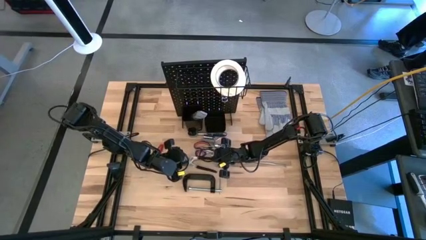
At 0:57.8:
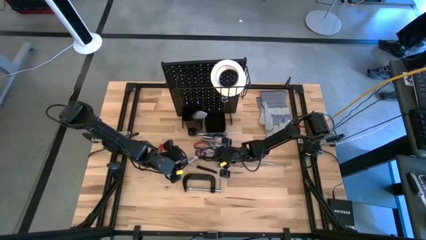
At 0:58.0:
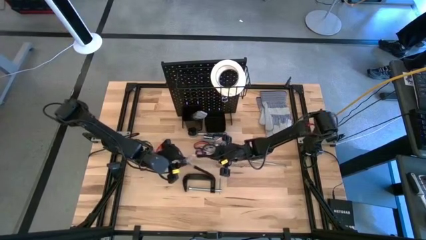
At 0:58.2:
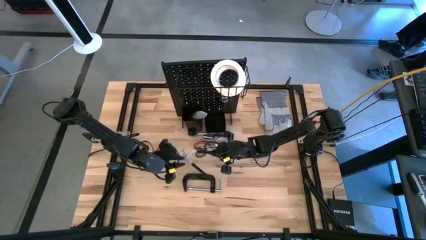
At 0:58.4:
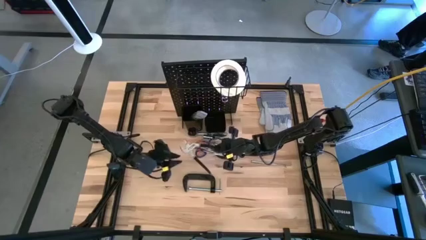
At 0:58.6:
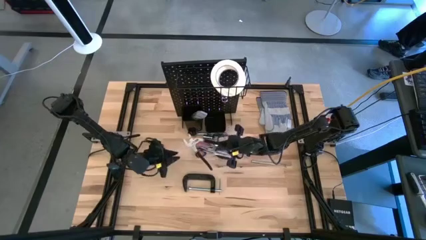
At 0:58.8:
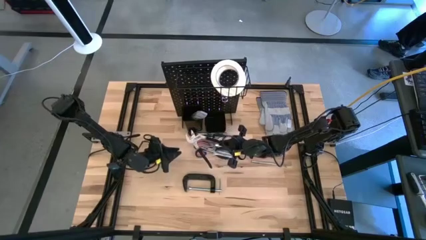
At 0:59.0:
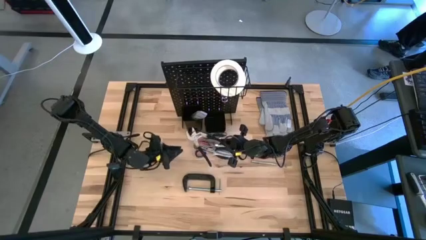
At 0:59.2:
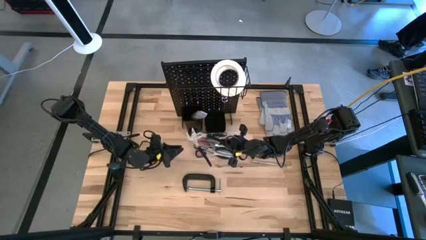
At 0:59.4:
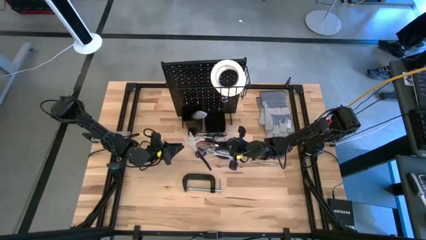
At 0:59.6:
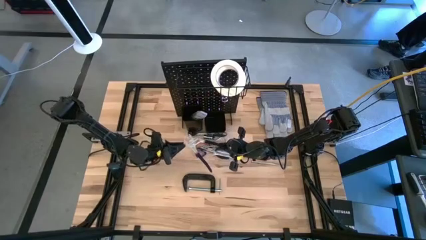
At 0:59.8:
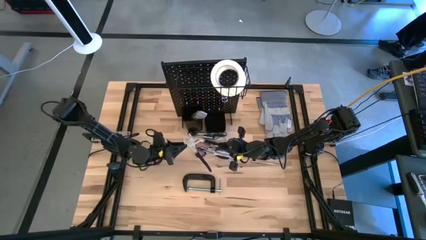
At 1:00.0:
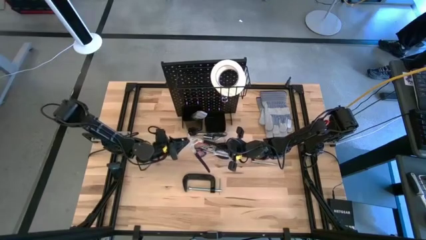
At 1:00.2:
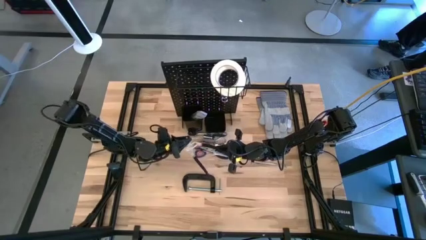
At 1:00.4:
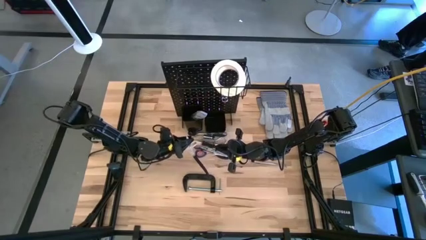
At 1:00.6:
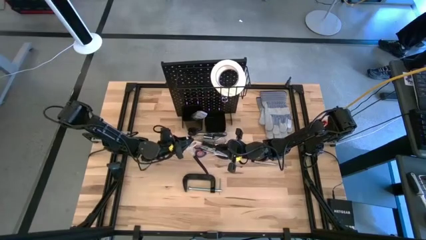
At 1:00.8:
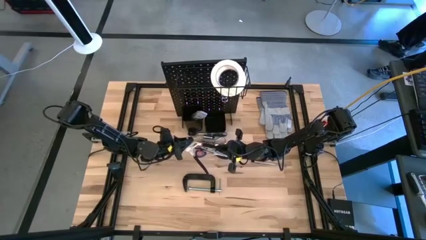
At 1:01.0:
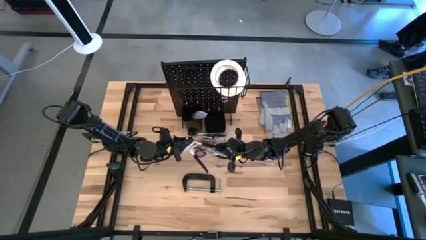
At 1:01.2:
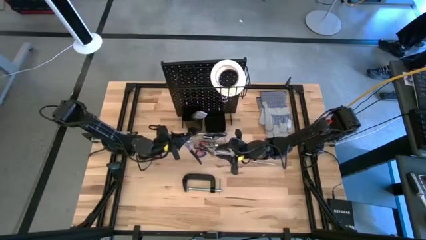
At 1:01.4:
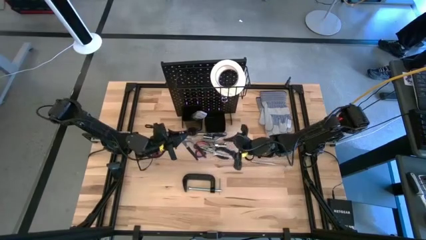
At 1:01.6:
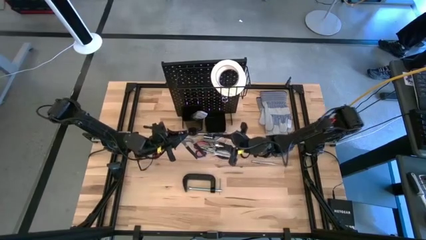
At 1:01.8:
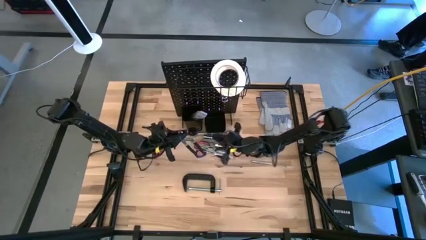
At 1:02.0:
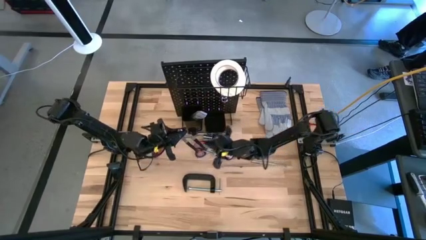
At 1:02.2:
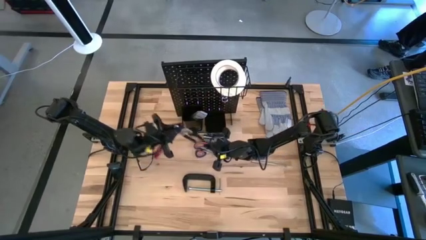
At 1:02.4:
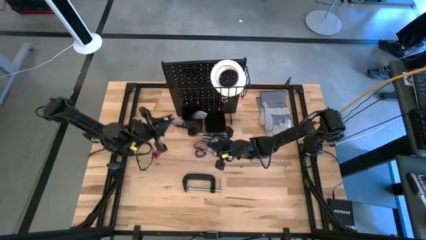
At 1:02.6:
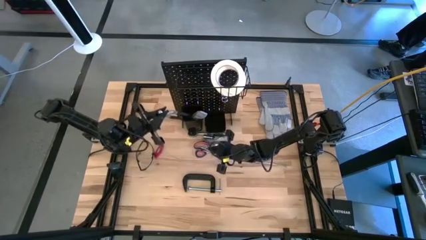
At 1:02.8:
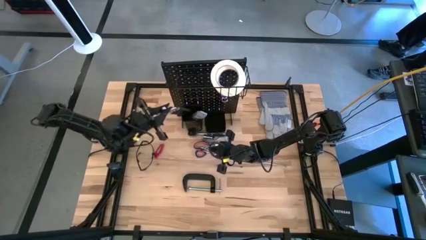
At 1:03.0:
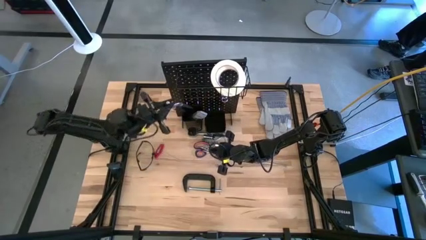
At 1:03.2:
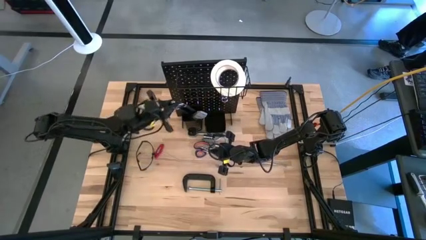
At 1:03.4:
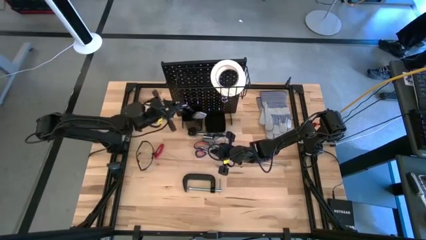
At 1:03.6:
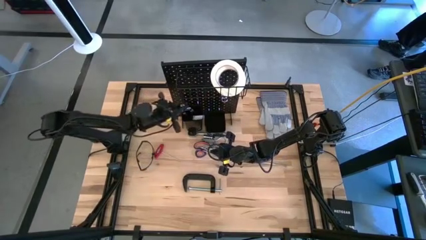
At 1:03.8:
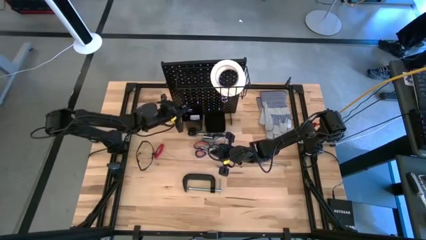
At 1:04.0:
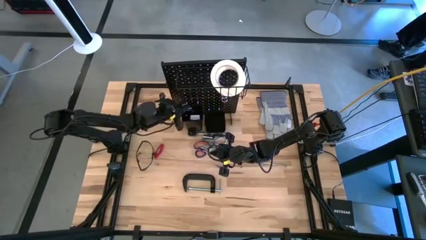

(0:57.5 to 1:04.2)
Task: Hang tools onto peg board
Put the joint pliers into the left bin on the pegboard

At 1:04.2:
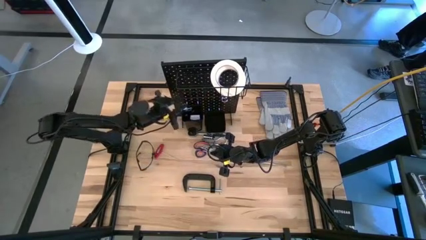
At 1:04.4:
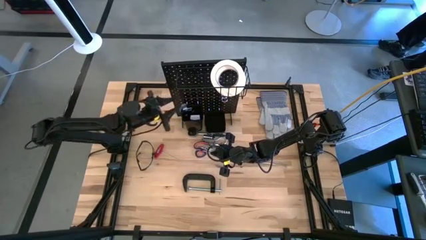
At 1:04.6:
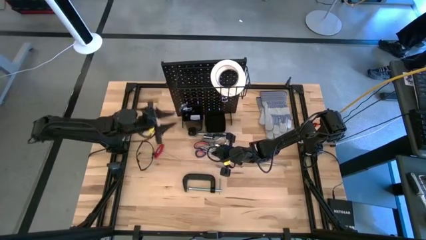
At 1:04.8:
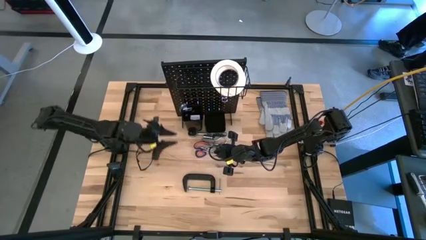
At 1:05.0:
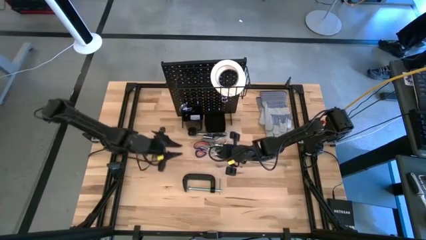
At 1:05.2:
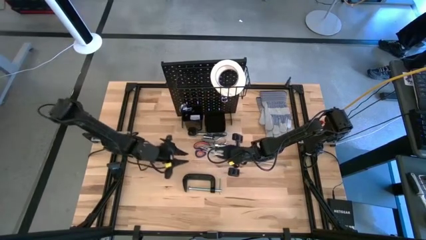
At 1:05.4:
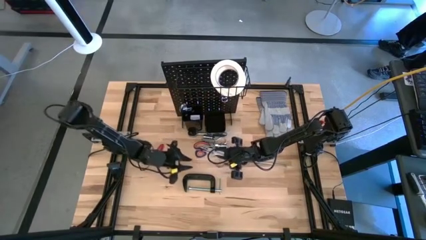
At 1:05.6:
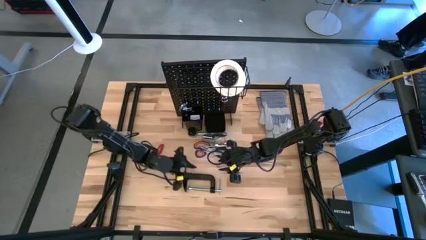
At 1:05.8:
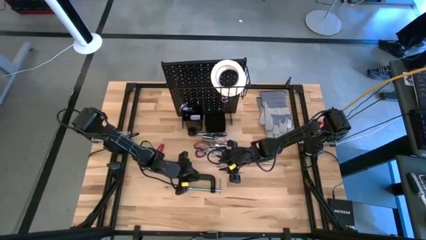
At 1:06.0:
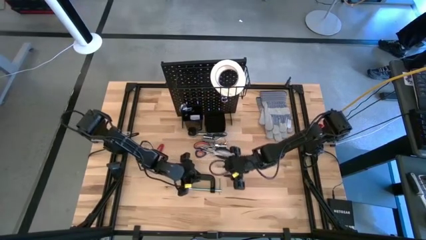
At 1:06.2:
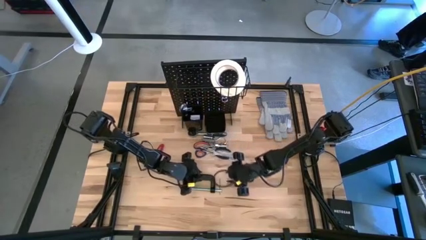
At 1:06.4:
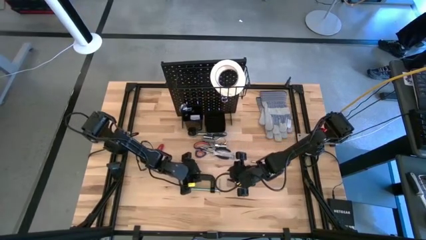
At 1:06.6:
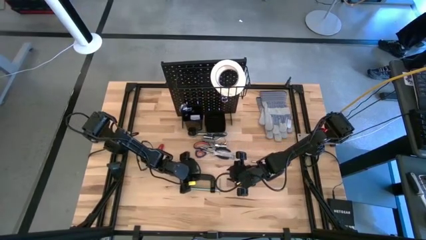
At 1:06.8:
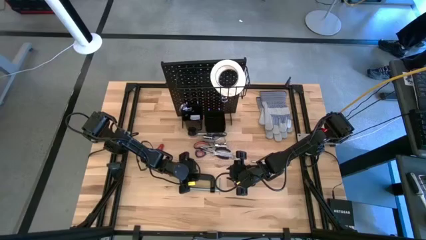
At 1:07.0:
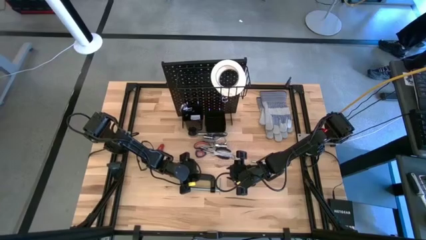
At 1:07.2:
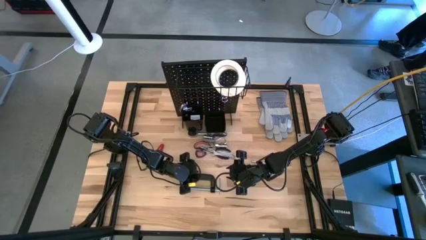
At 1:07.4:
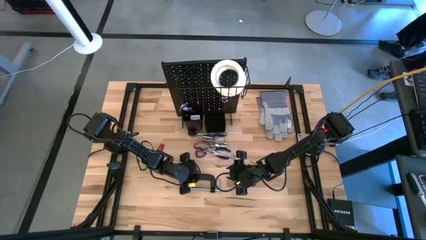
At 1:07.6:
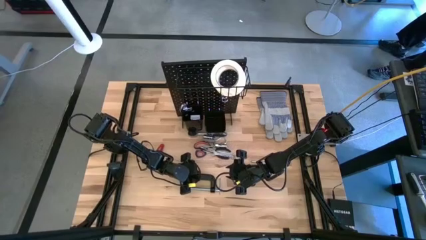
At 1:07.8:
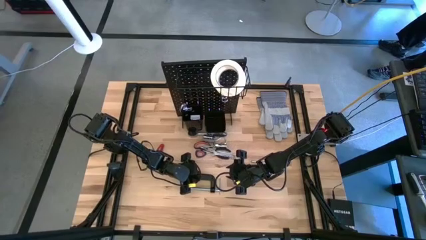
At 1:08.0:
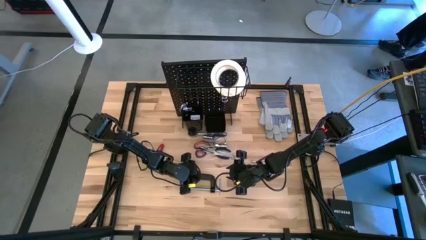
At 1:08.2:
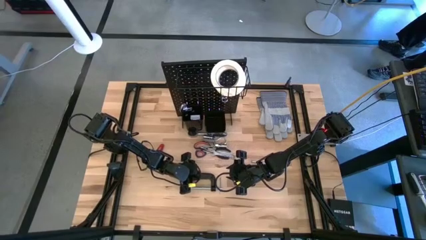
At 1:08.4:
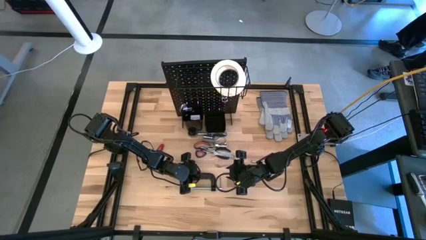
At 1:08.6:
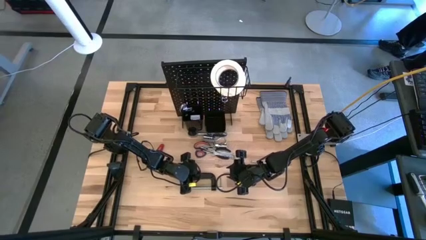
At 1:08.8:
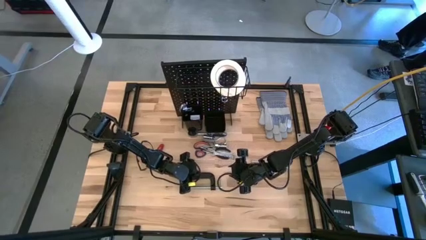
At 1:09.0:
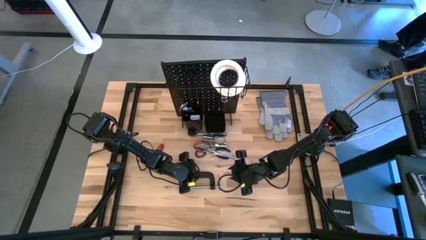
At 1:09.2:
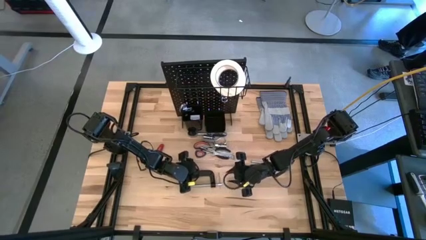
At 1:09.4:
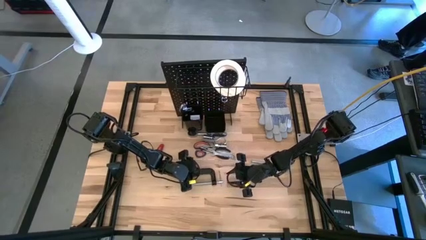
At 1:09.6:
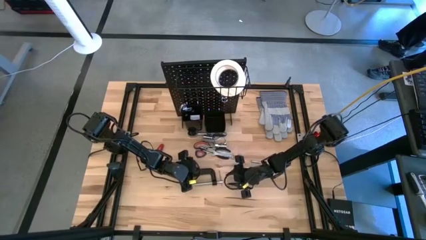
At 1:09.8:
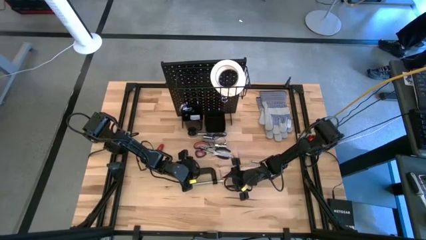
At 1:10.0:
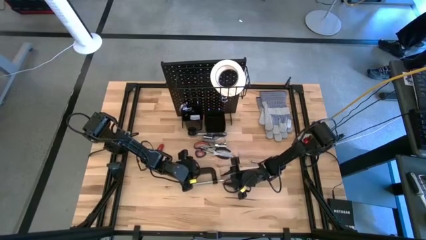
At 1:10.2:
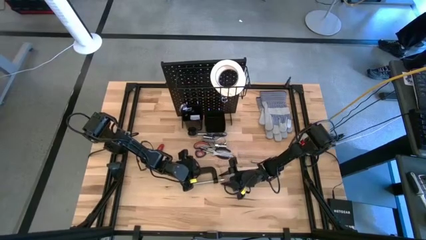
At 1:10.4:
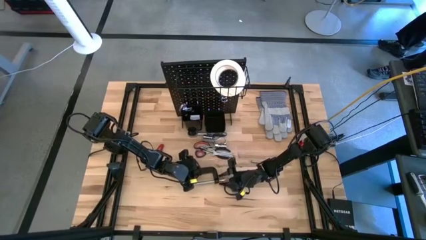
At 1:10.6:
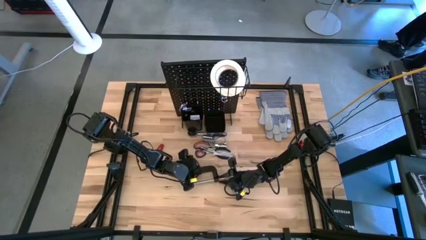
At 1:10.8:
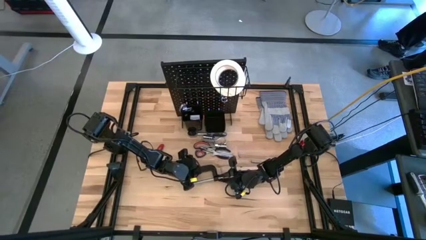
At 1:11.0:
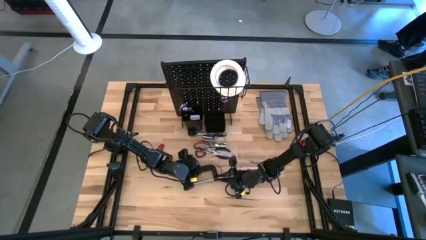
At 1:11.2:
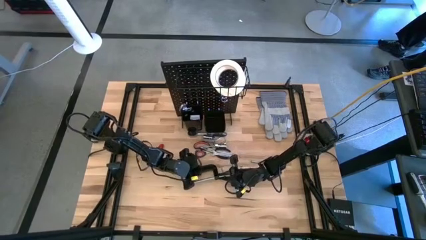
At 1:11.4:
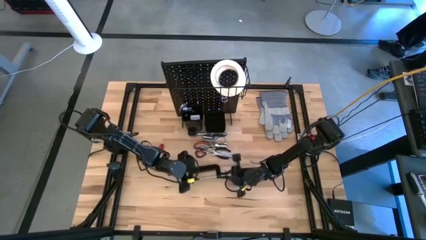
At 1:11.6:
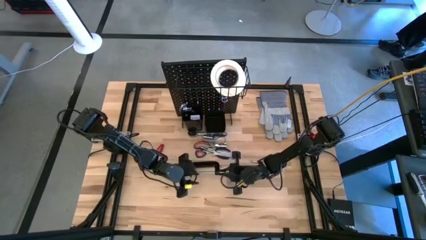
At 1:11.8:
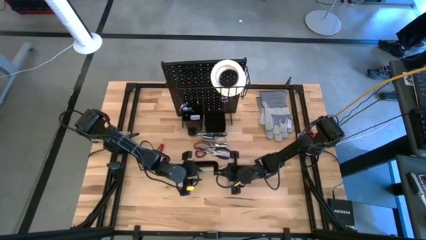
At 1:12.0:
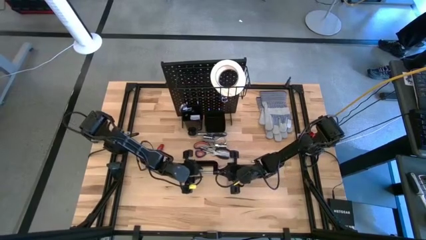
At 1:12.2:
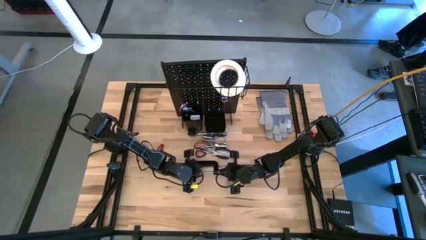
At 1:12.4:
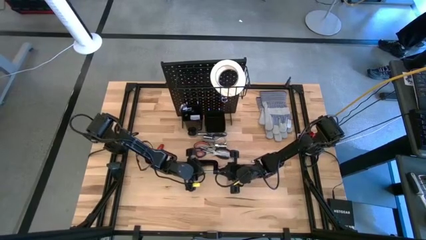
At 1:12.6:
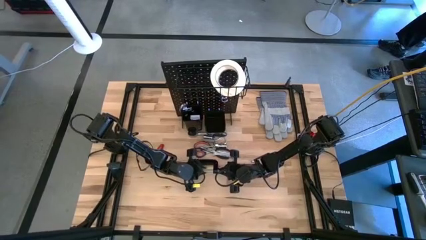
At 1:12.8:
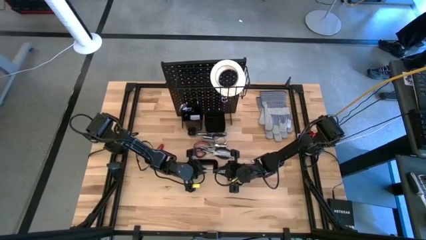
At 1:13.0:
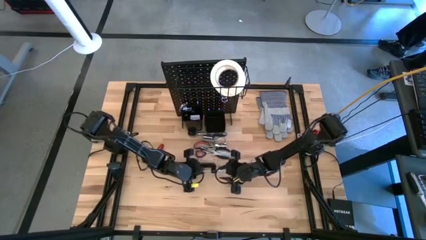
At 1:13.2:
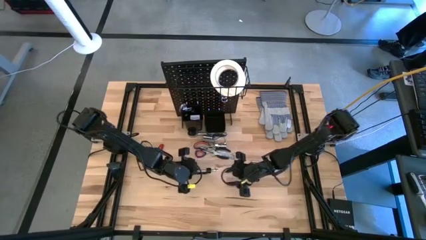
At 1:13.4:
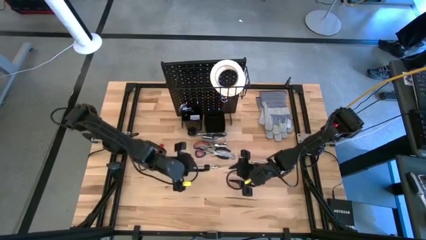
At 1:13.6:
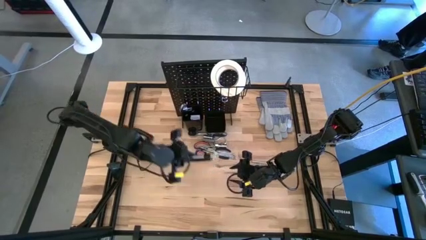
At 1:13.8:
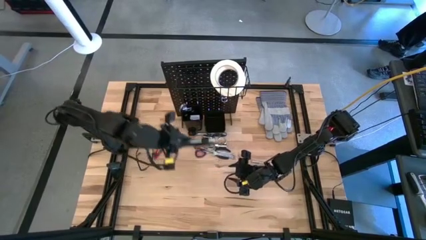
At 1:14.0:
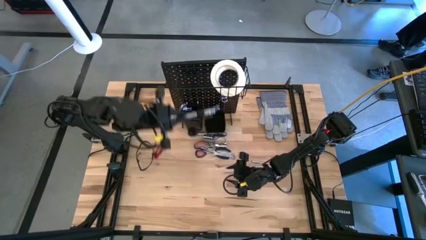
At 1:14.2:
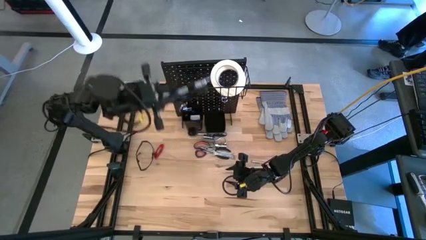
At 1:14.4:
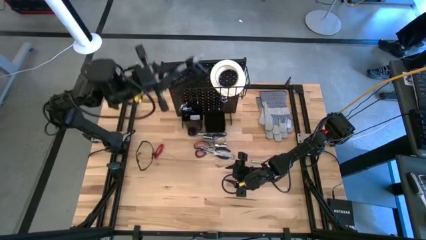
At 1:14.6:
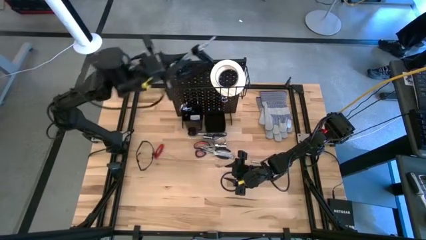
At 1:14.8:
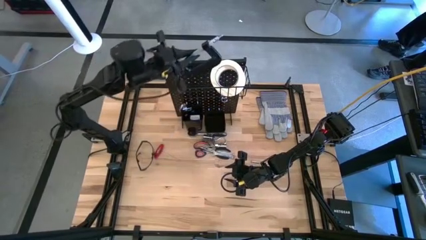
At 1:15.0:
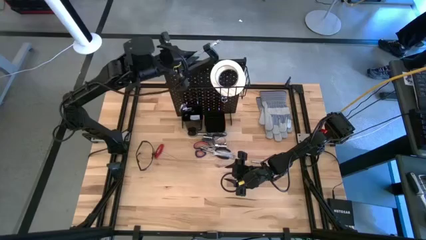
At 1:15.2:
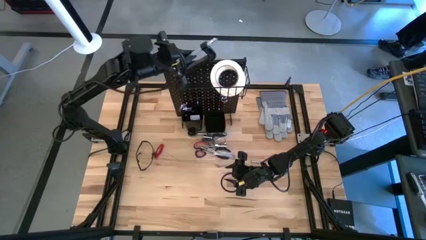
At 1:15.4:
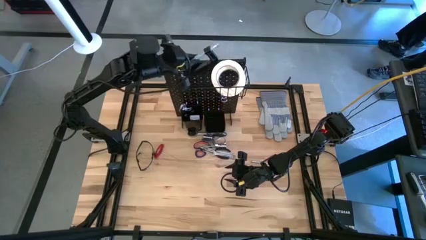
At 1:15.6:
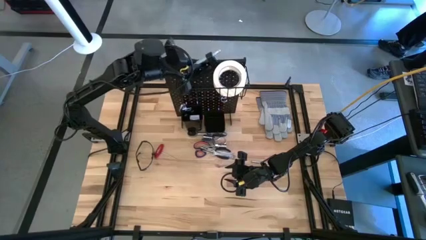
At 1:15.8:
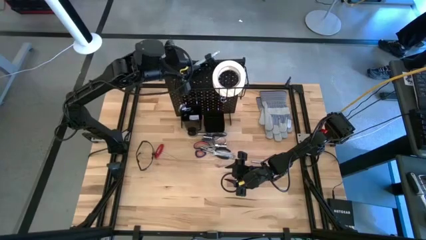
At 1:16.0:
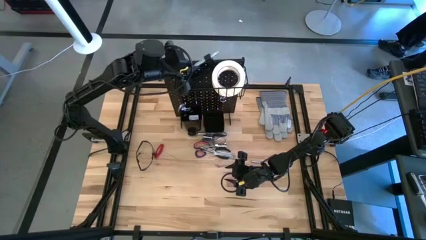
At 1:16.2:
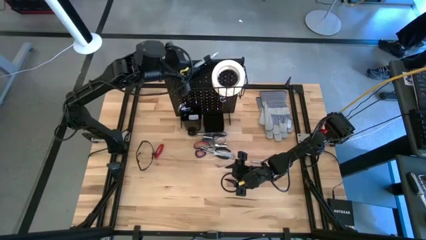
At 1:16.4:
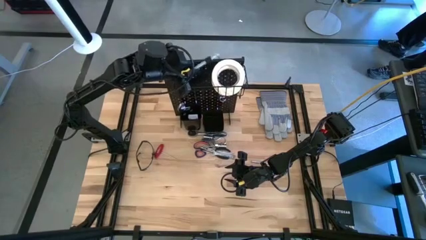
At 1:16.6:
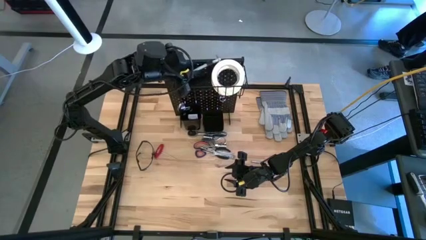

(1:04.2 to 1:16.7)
Put the black clamp into the wire basket on the pegboard
